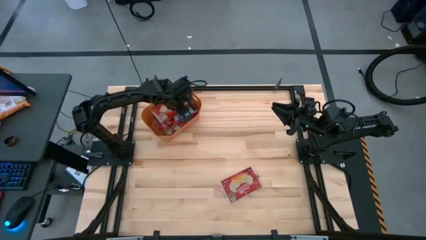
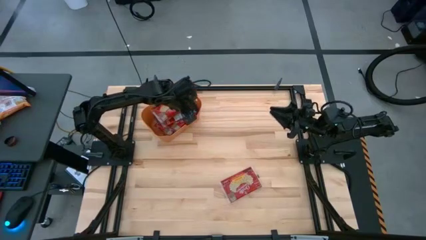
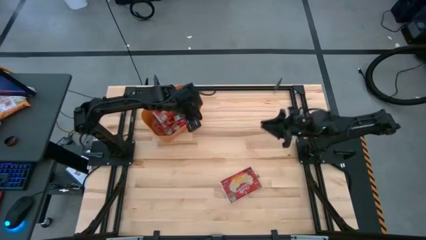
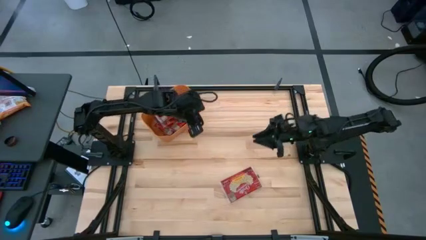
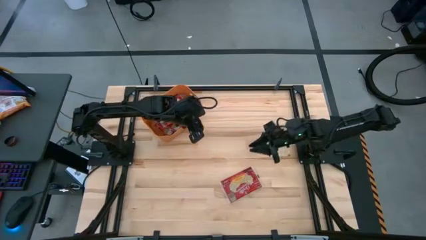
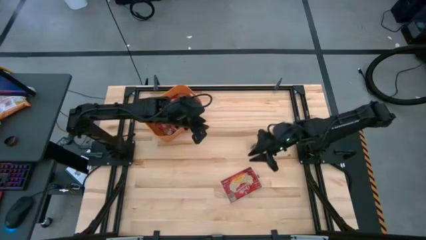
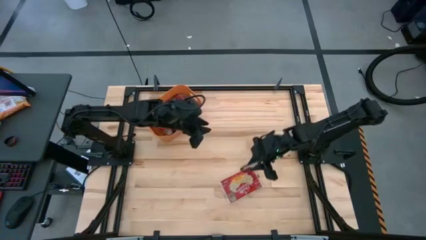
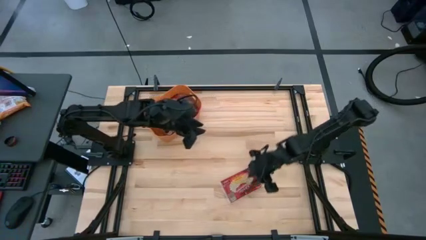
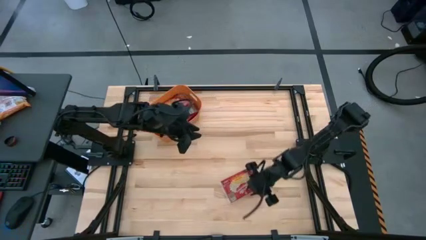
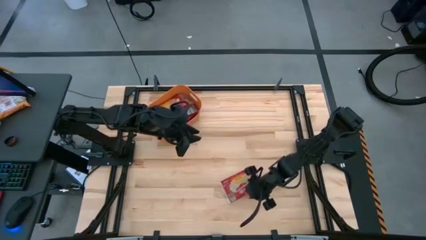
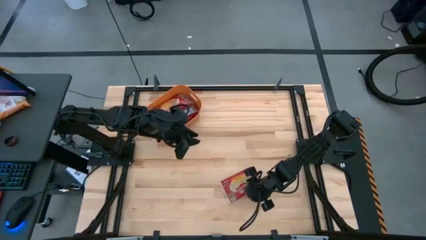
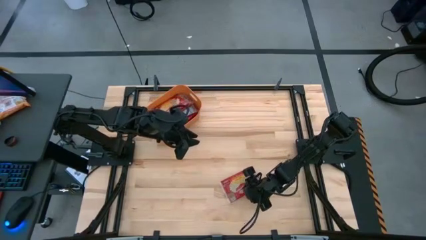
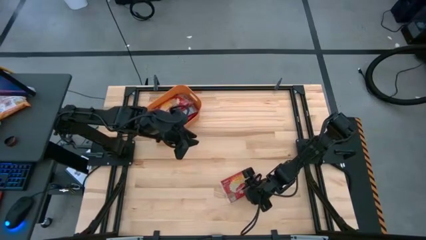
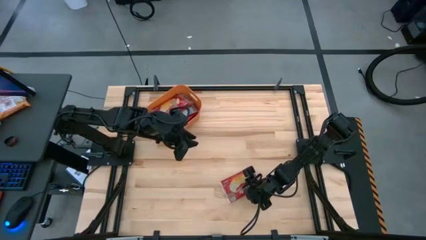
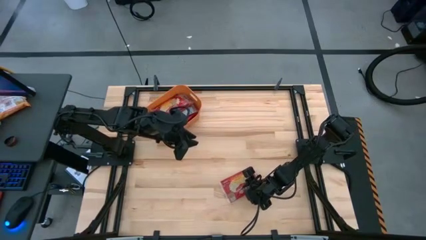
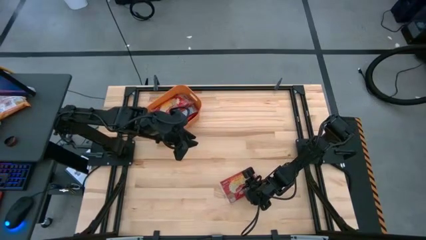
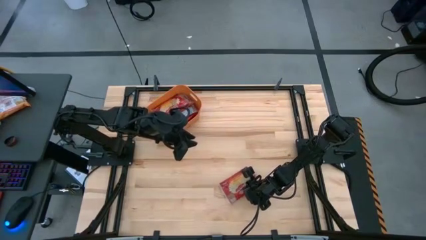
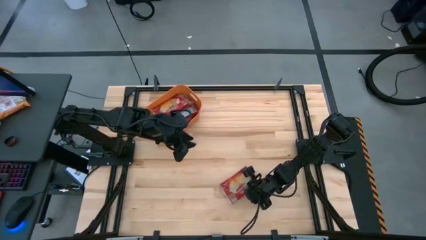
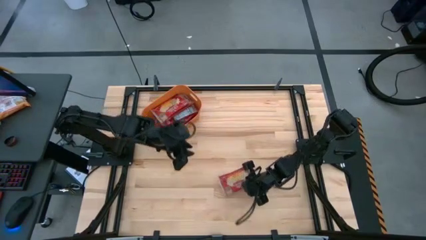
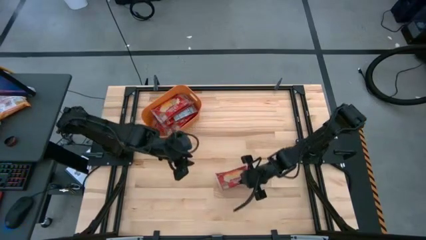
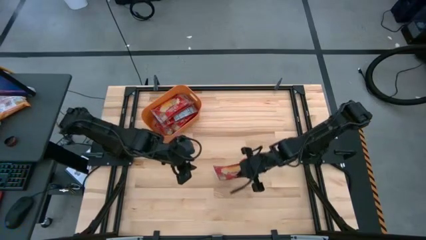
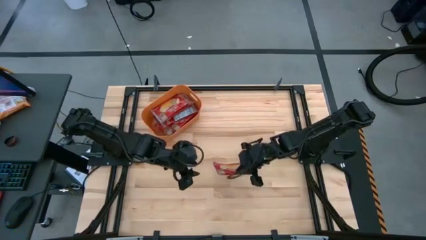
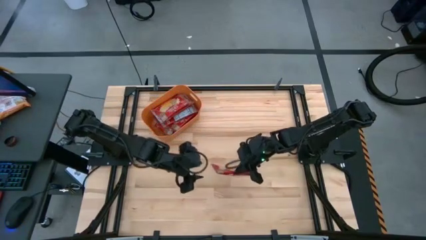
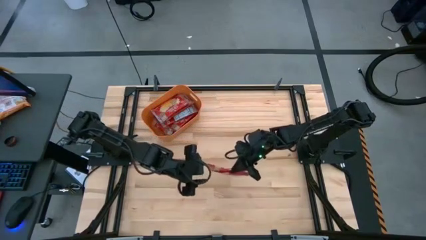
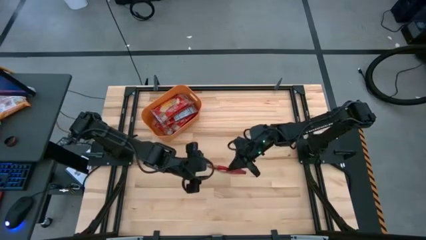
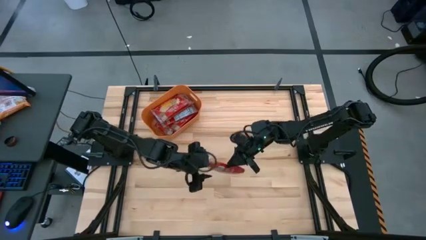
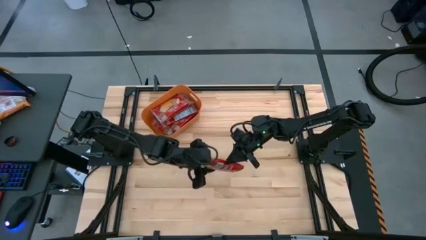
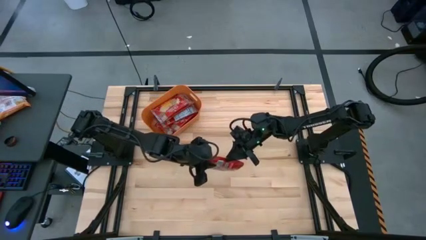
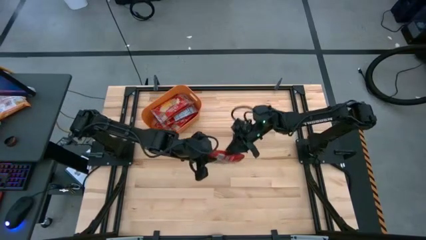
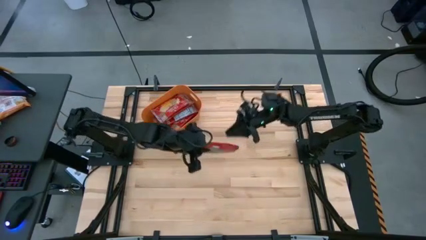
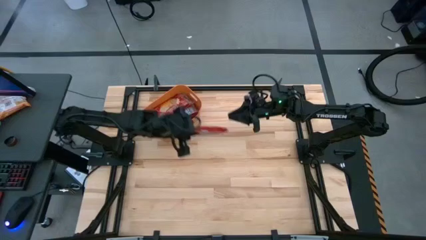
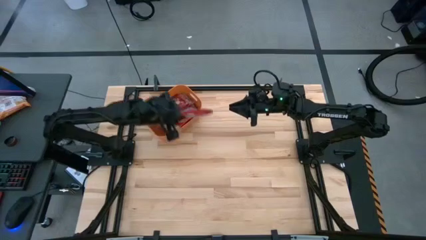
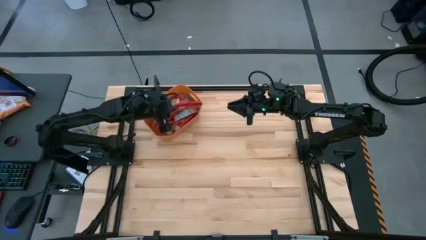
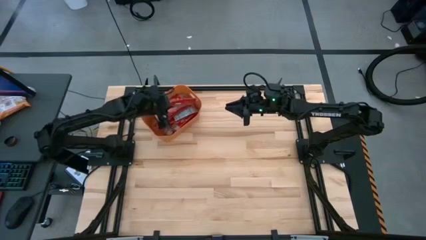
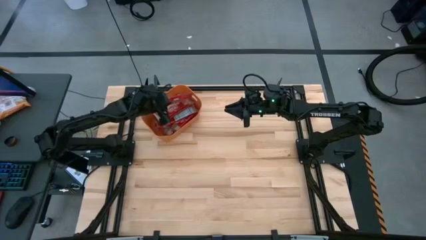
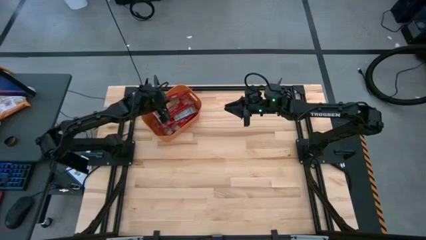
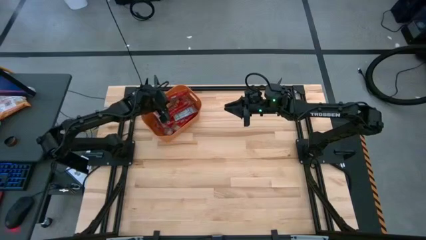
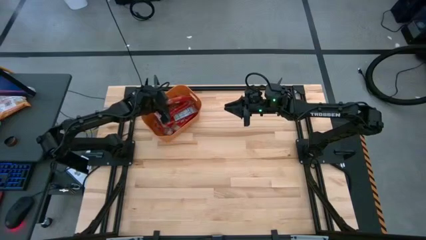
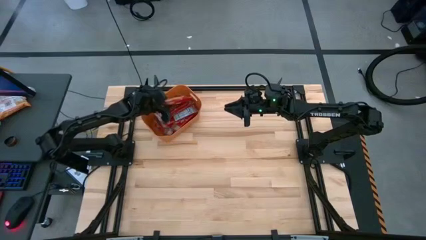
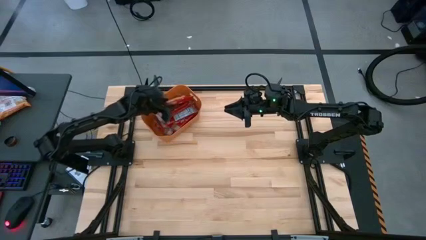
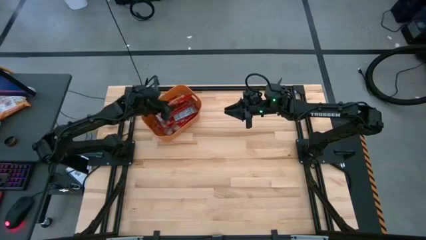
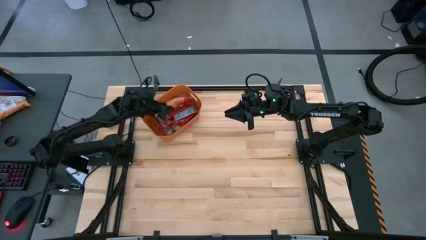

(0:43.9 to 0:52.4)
Task: Sort popcorn bags into baskets
Put the red popcorn bag into the orange bin

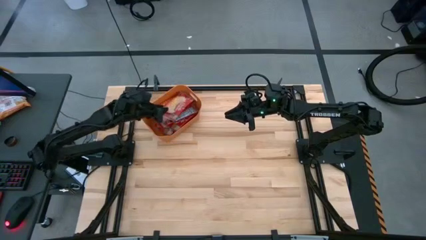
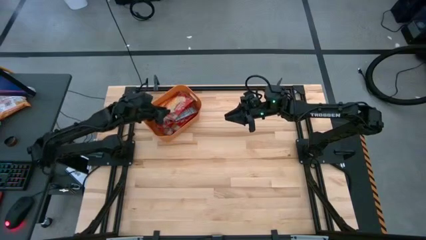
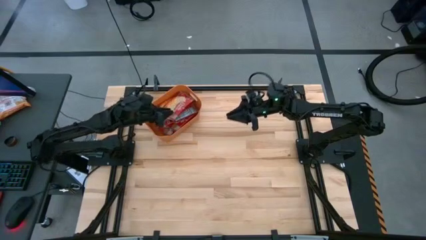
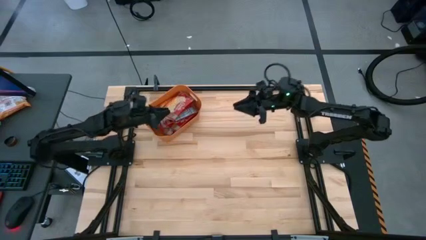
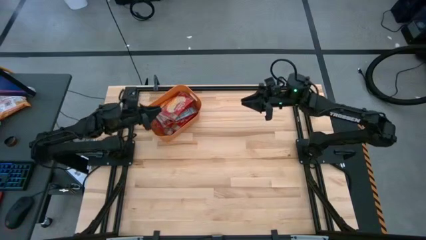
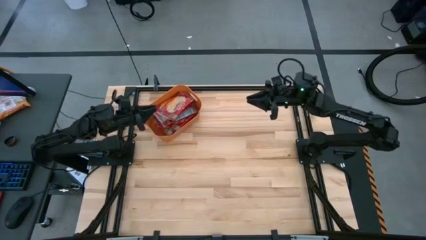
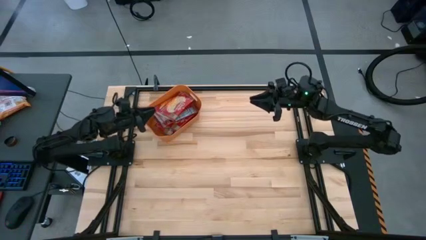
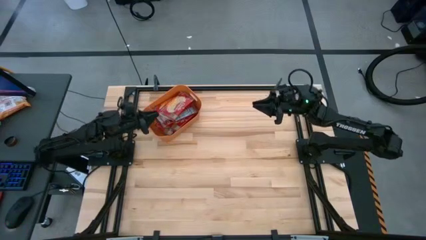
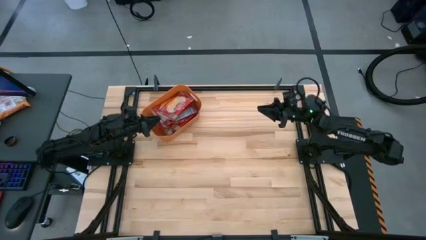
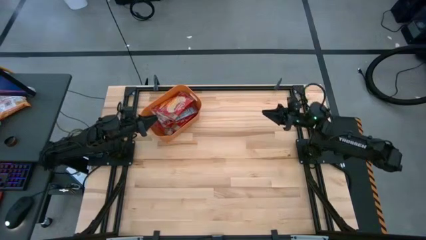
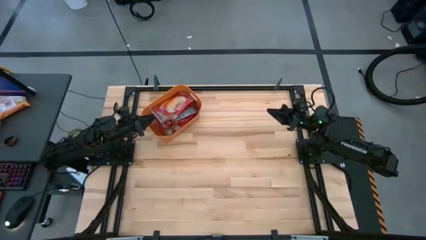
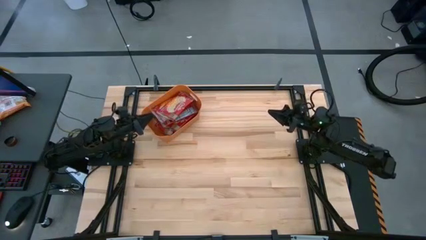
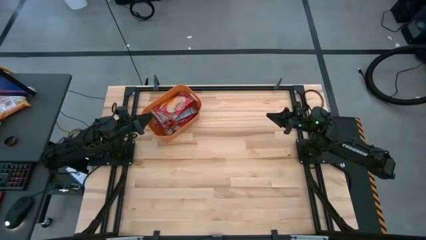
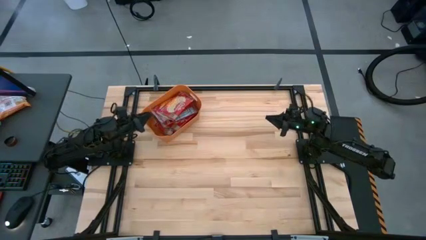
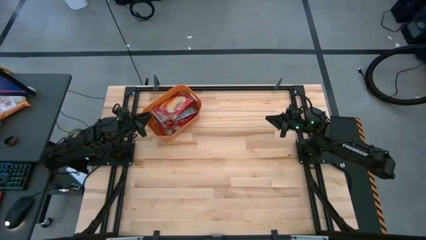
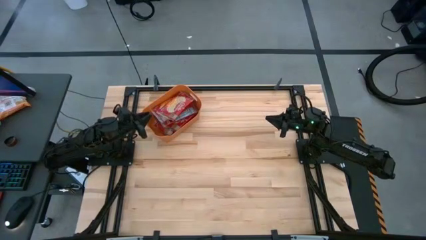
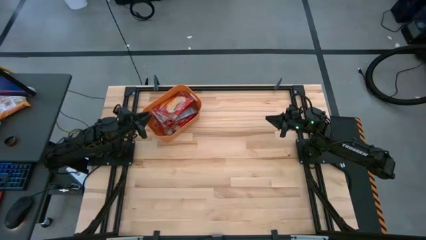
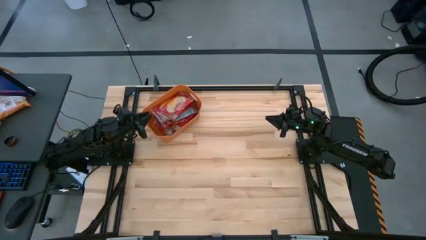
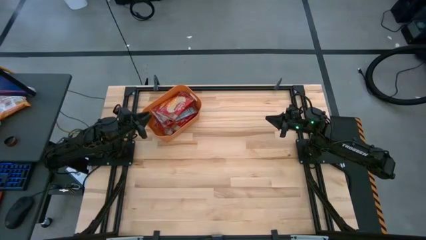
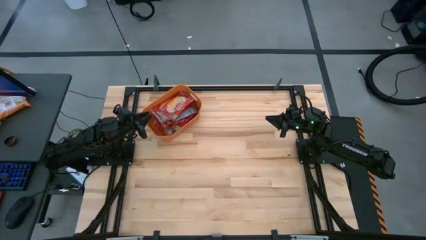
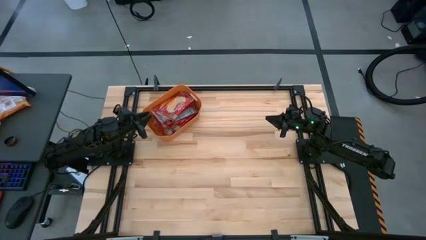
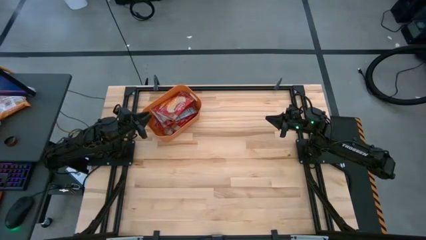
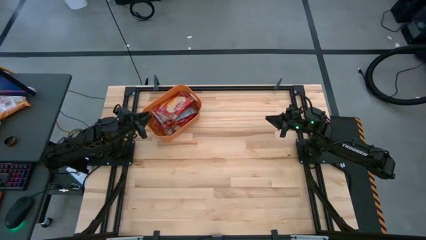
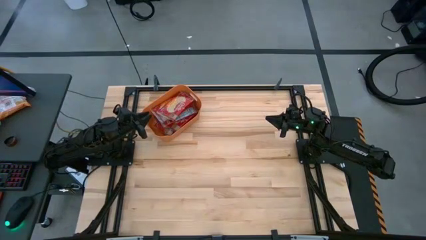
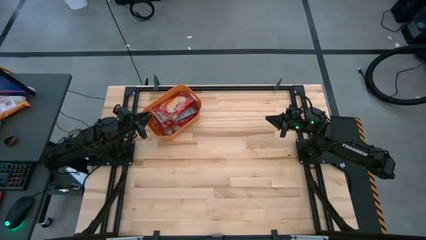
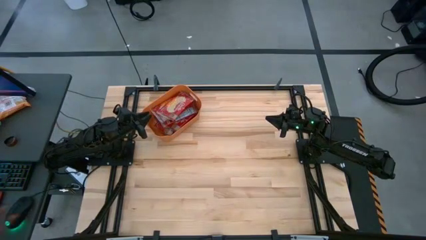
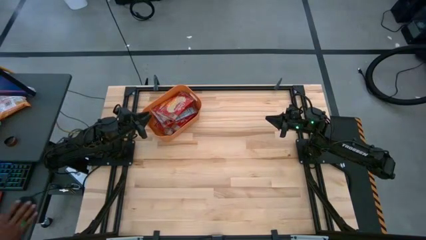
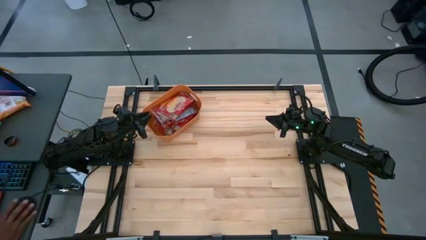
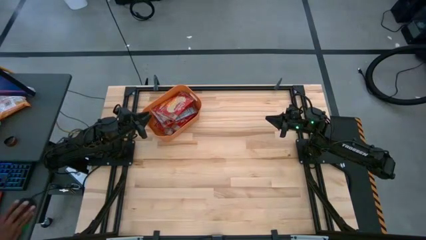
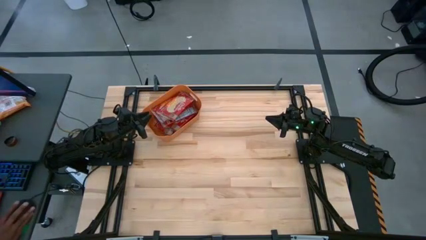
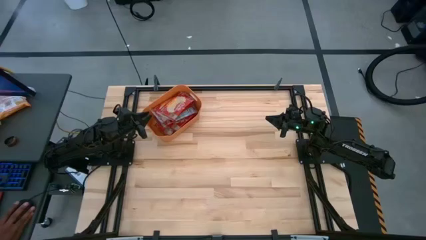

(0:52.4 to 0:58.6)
Return to Home Position

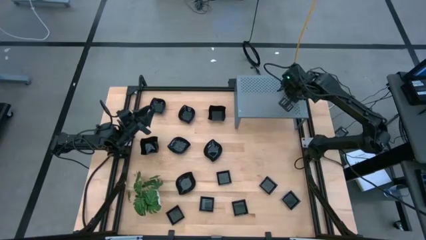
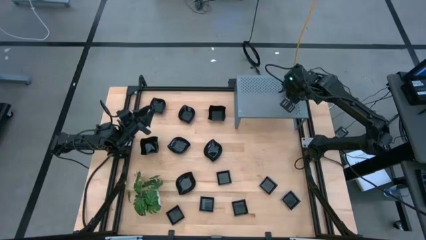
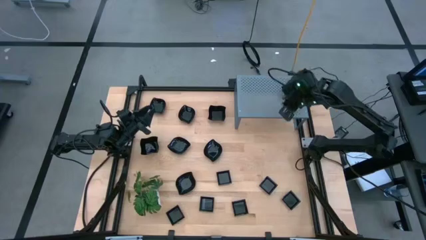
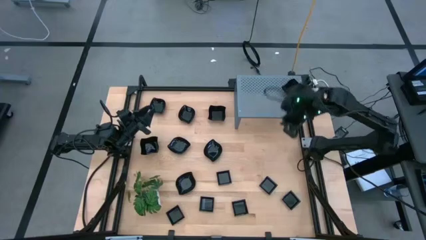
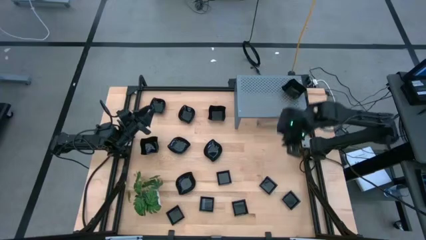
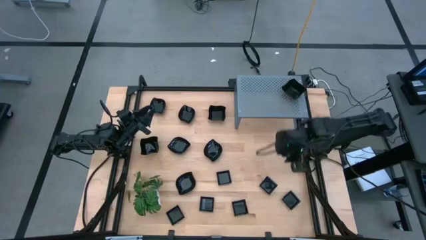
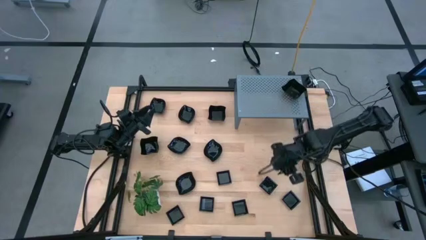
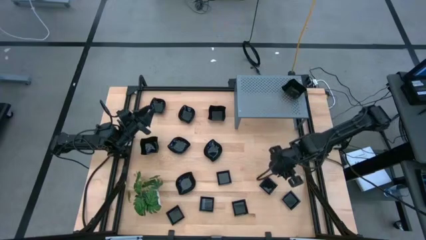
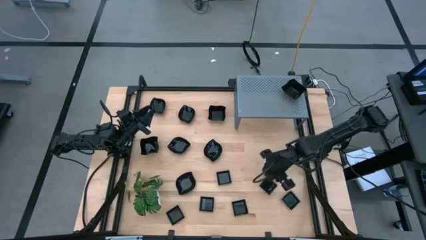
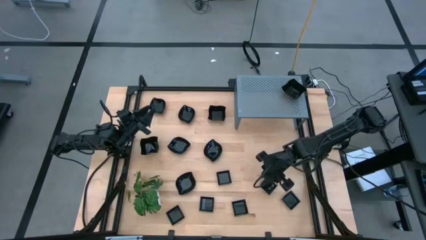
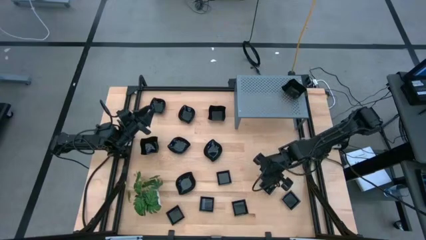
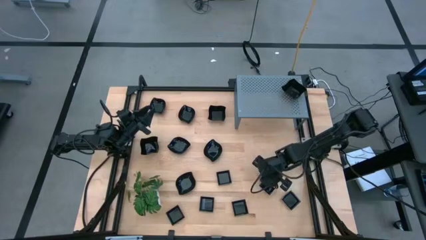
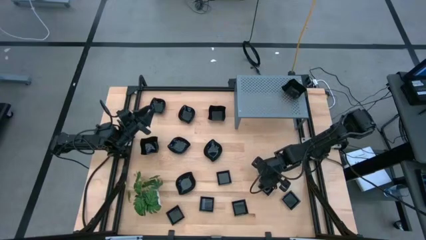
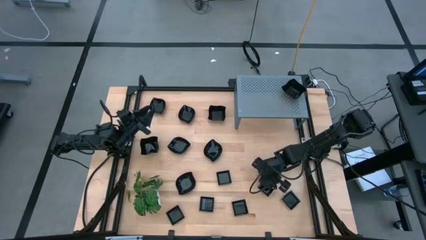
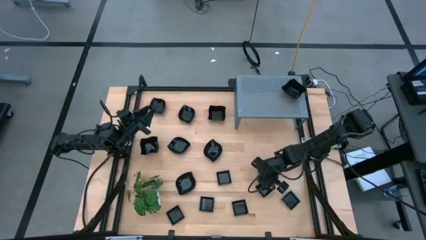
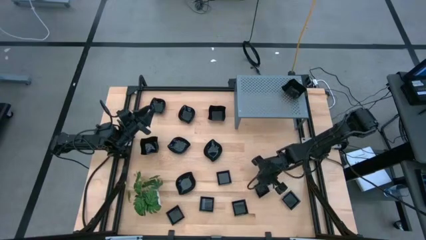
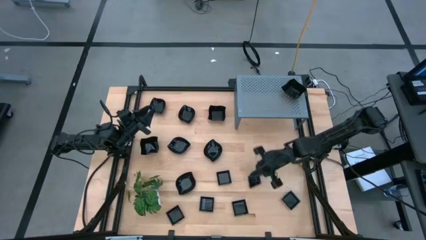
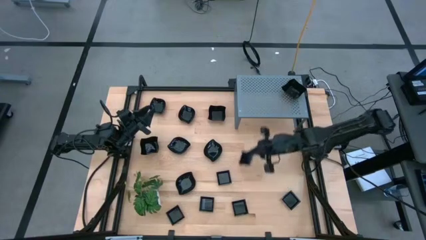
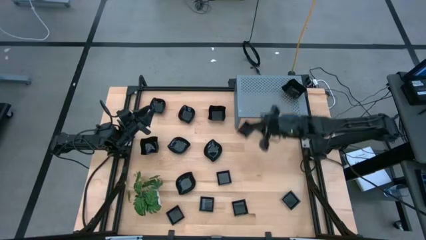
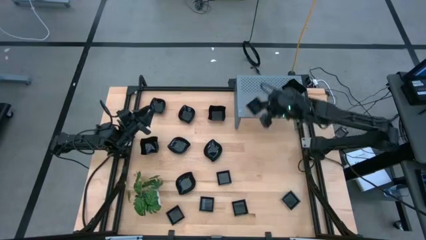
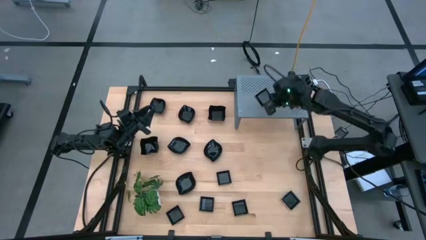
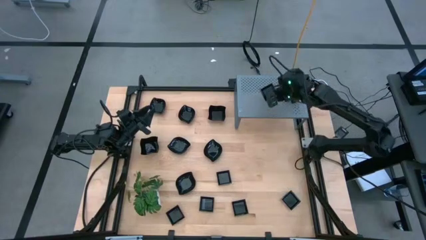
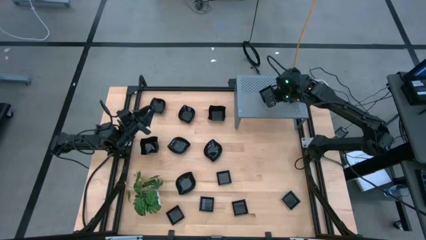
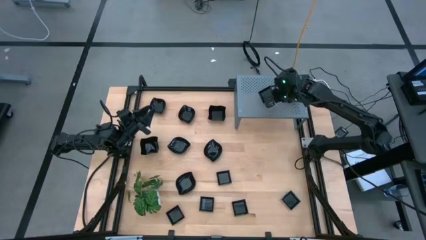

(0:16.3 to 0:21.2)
Task: Pick & Place Mini shaped plates
Put the square plate on the shelf
